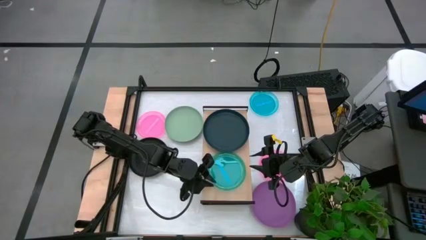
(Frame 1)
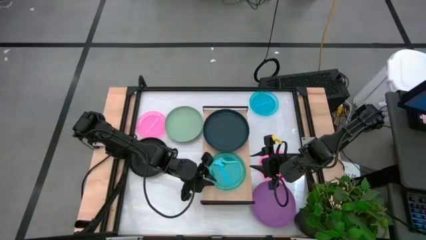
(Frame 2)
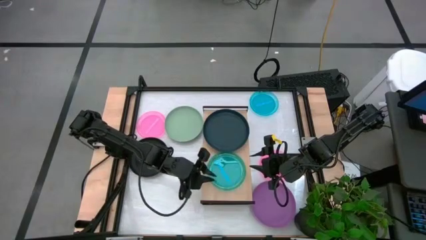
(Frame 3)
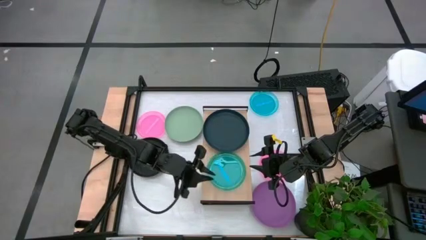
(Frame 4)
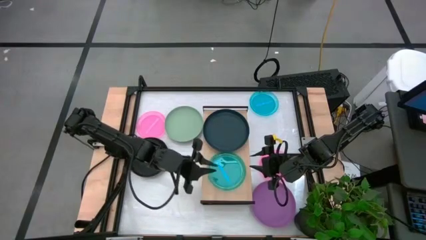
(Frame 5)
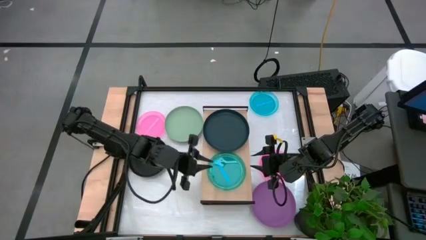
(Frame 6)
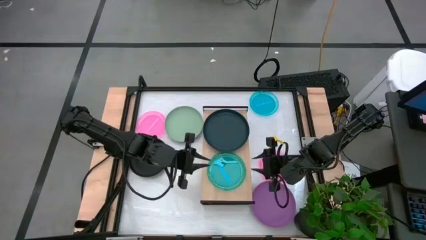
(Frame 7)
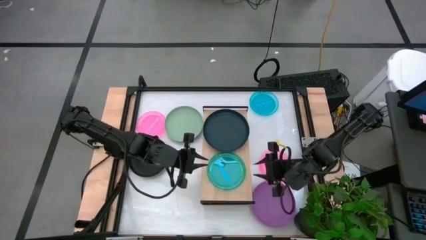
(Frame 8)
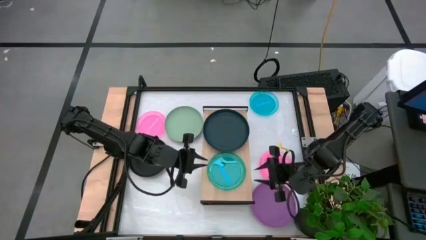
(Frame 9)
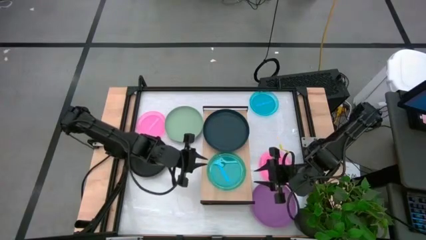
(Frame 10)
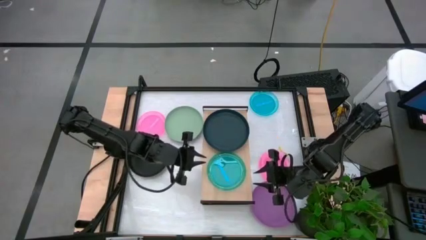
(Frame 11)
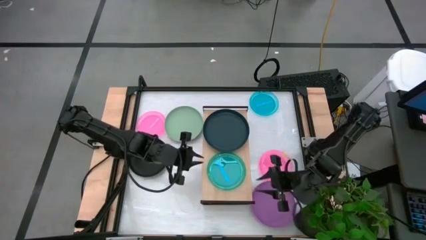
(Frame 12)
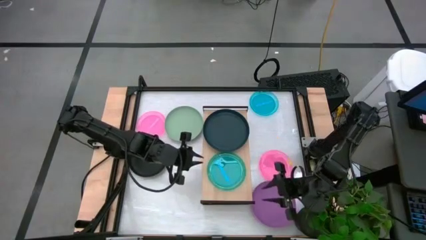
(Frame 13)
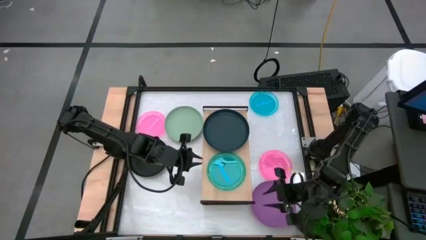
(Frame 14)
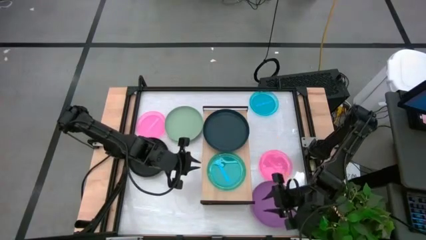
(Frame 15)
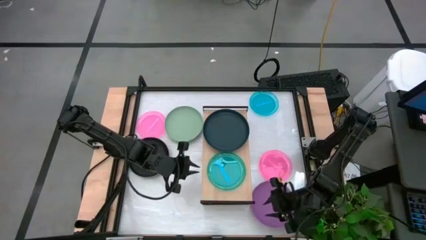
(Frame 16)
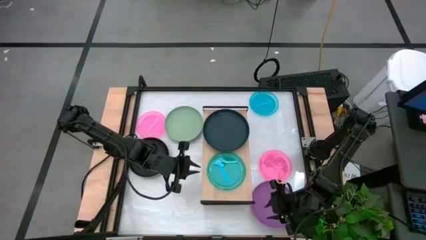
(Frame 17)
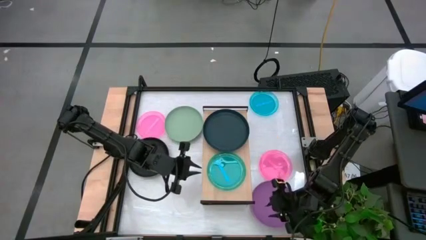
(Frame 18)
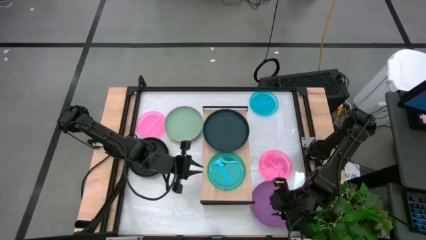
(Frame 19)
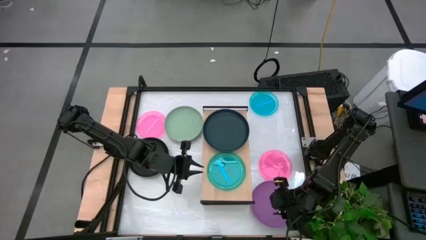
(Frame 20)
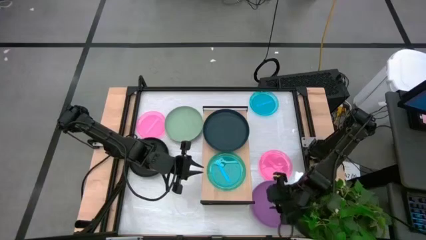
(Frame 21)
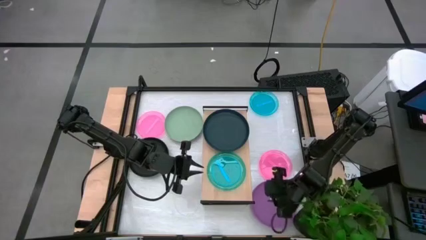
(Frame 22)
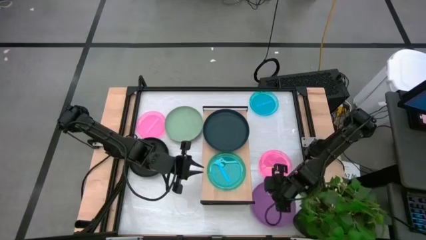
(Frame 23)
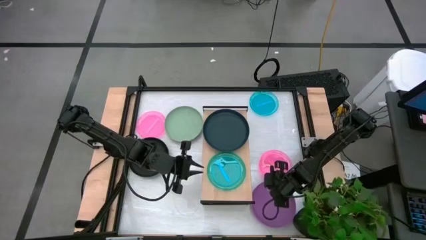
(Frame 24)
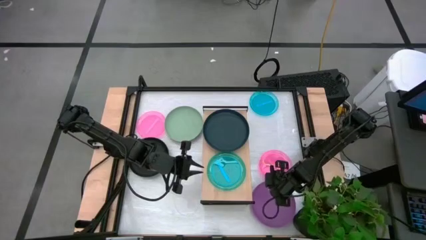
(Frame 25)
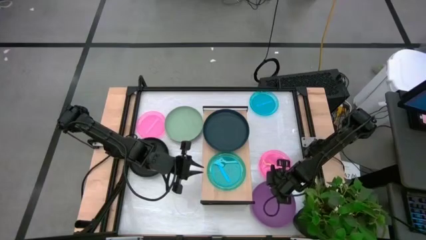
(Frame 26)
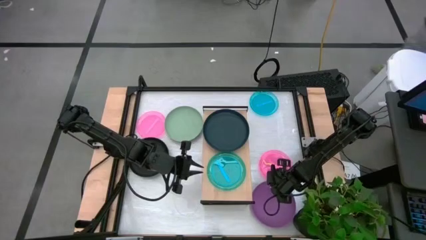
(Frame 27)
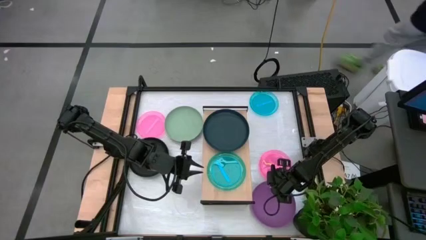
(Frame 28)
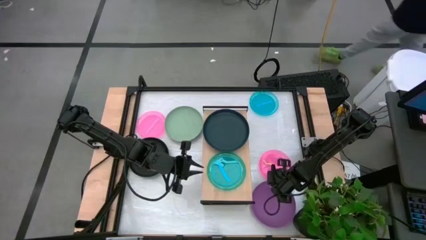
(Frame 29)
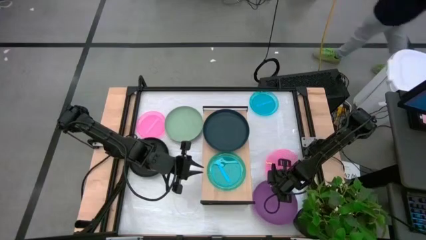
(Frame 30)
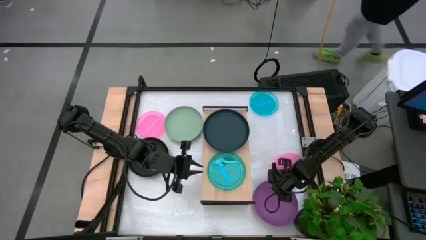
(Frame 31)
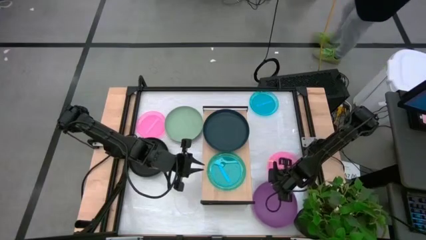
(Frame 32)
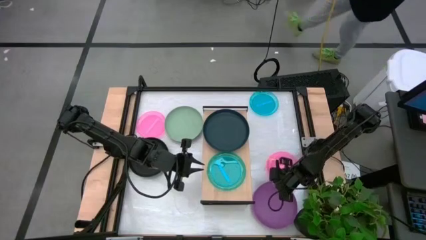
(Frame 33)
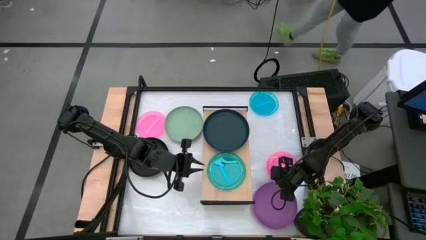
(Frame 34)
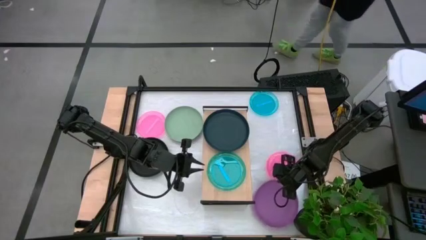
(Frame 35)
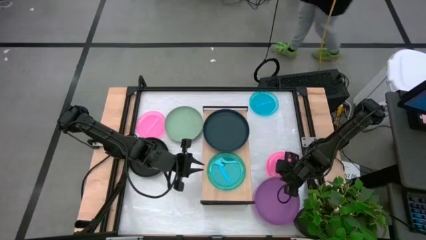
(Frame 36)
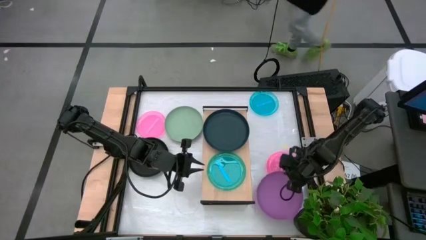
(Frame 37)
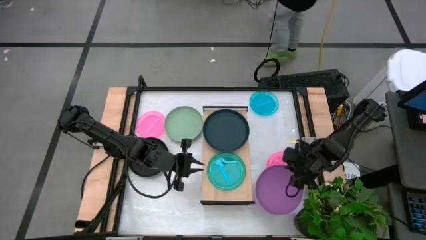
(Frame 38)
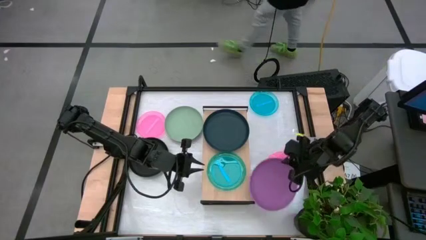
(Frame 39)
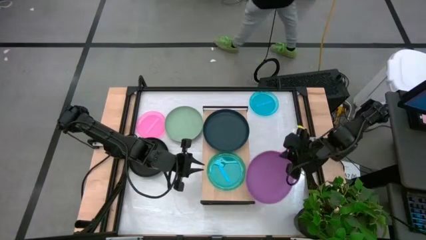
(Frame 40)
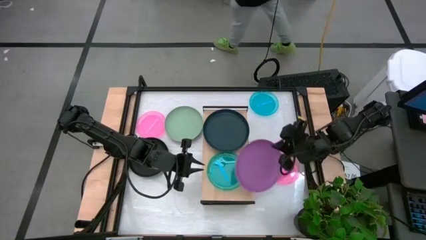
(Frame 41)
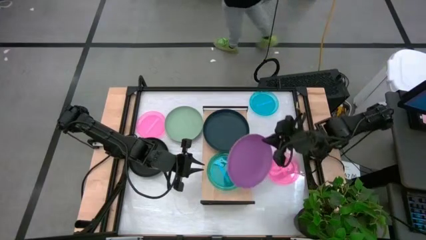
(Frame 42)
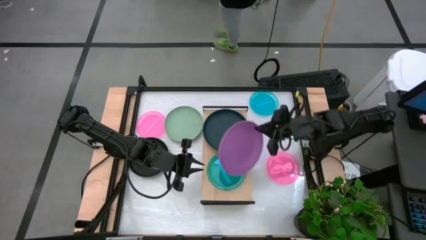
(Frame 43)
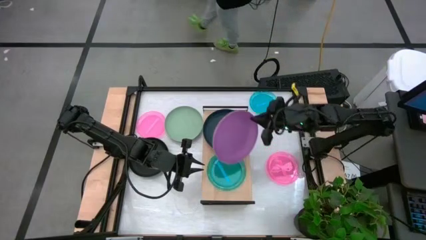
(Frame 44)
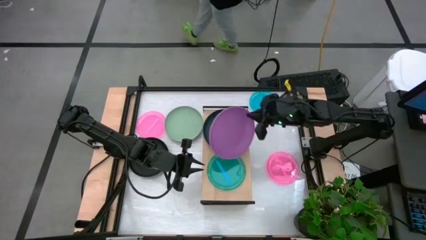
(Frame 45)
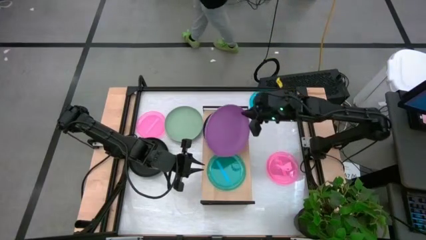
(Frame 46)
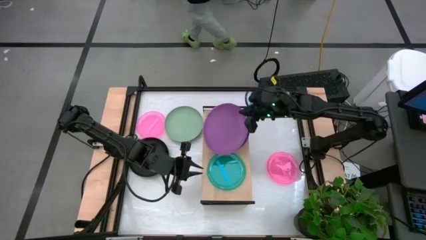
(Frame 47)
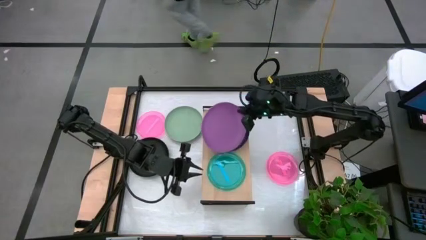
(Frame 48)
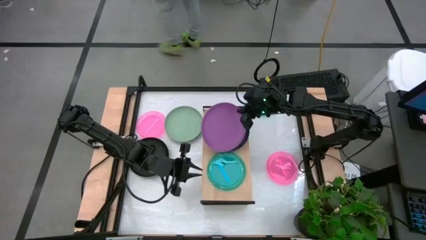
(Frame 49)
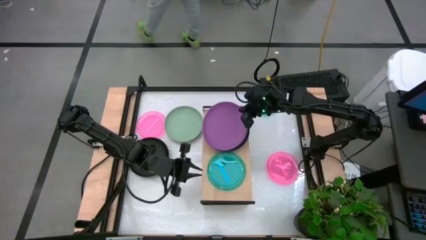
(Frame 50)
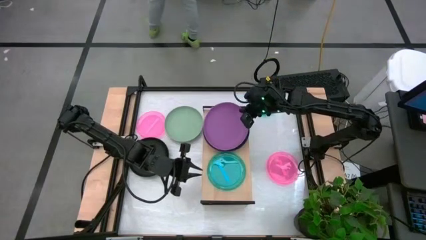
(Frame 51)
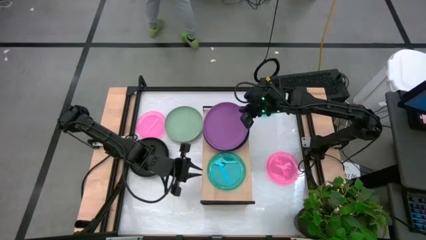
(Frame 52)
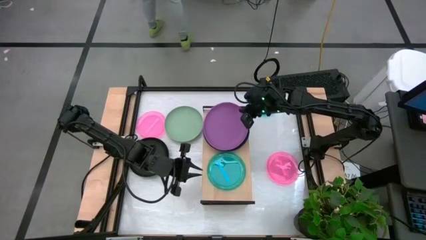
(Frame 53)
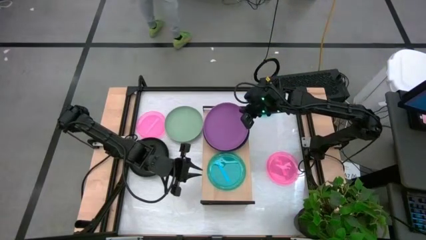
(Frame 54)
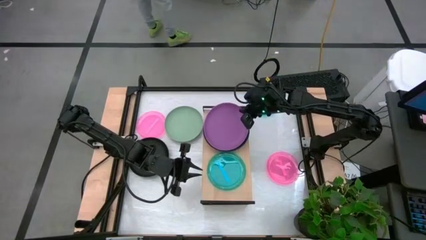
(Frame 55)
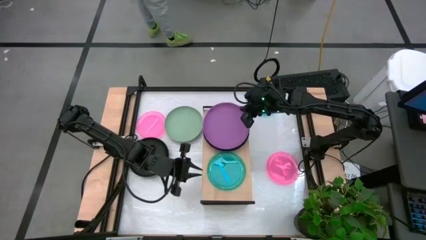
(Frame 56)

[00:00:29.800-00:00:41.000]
Task: Place and stack plates onto a shelf
Stack the purple plate on top of the dark green plate on the shelf
